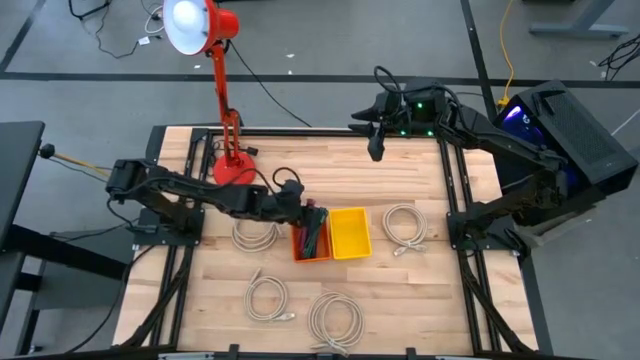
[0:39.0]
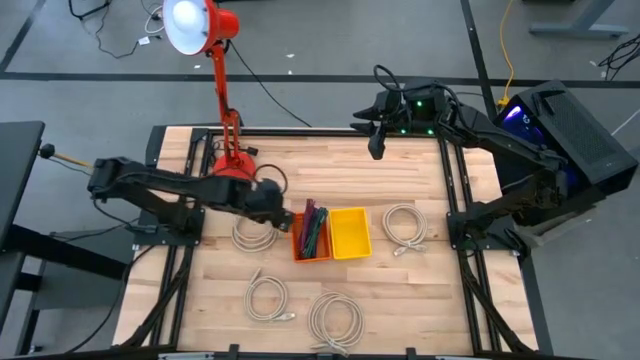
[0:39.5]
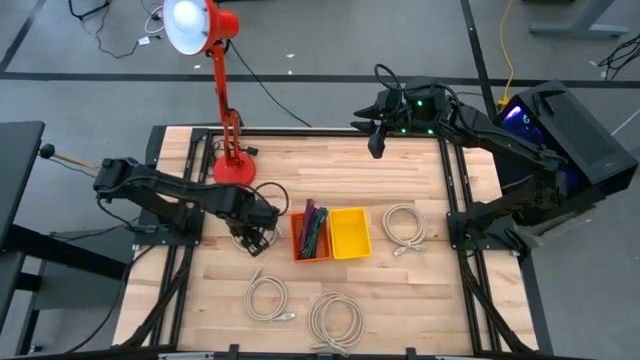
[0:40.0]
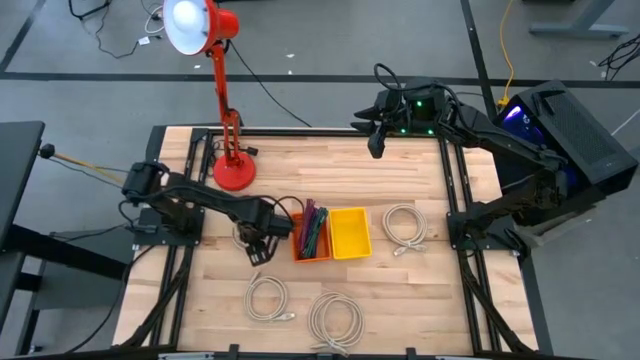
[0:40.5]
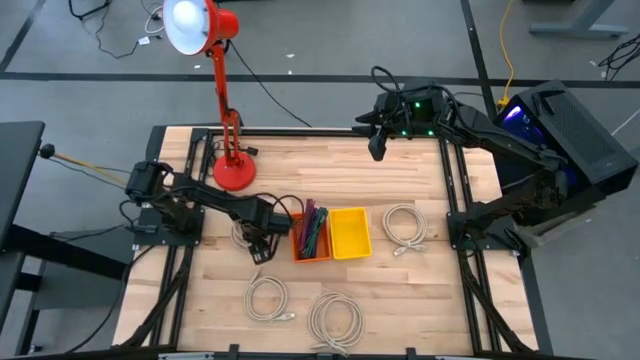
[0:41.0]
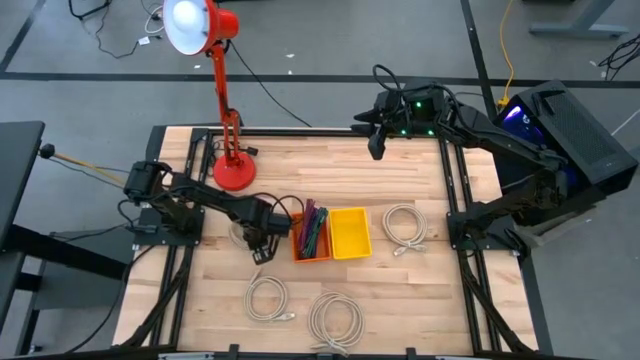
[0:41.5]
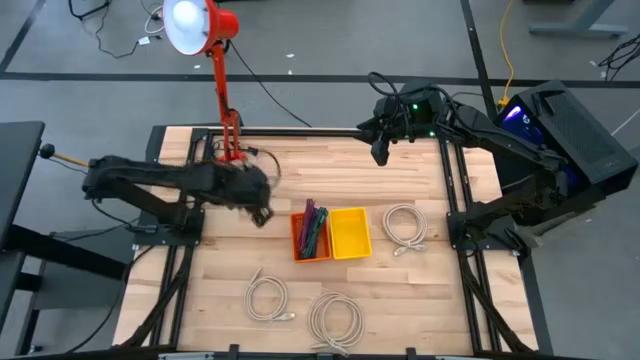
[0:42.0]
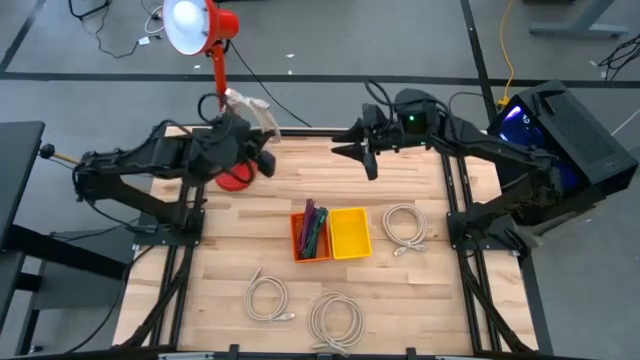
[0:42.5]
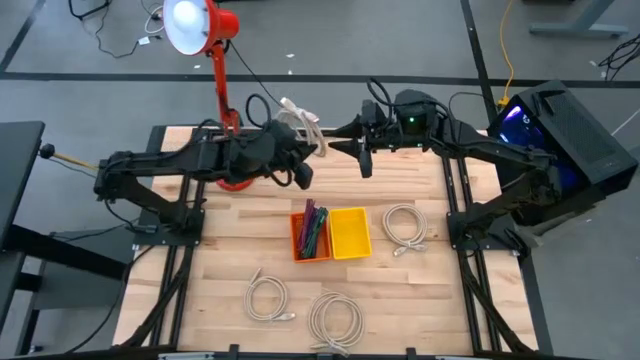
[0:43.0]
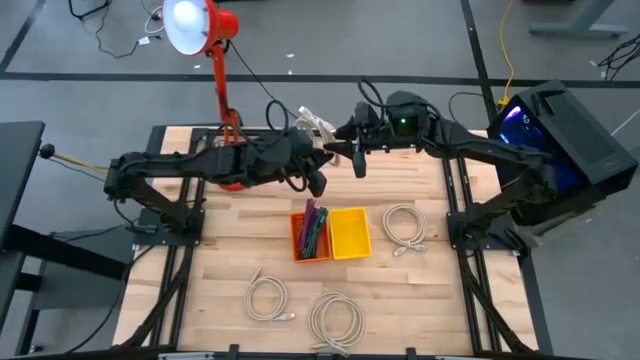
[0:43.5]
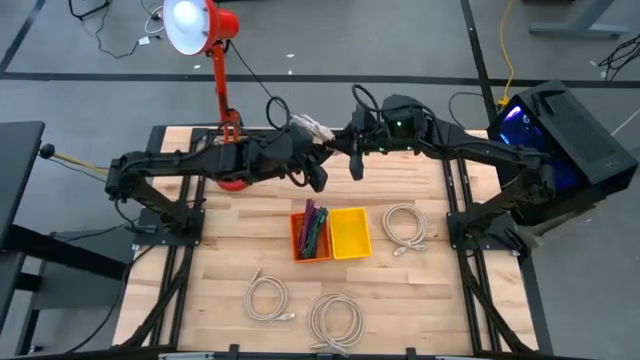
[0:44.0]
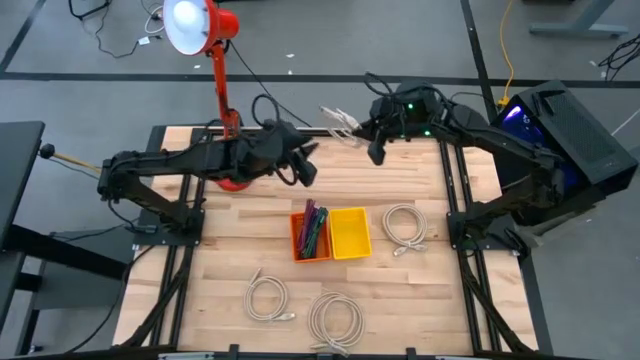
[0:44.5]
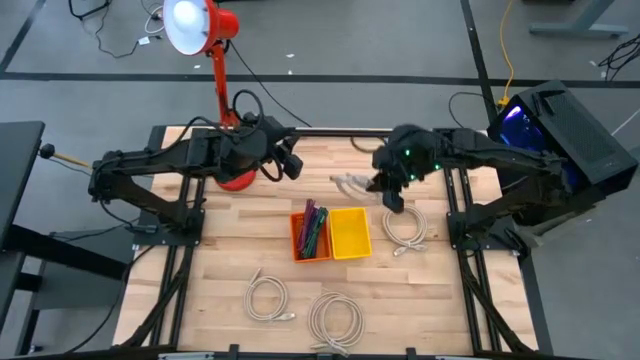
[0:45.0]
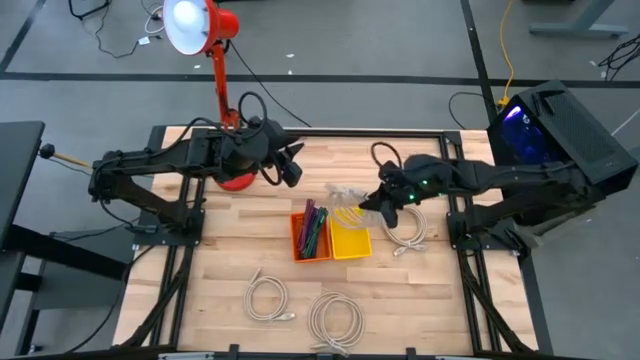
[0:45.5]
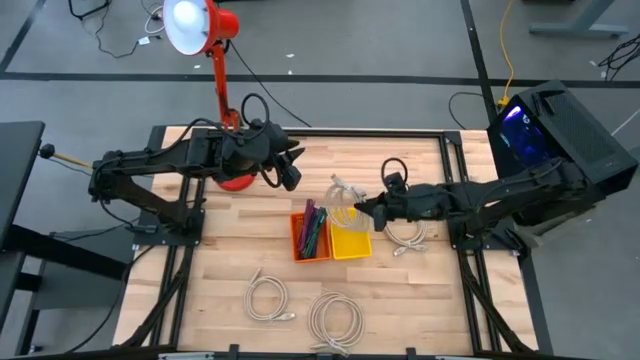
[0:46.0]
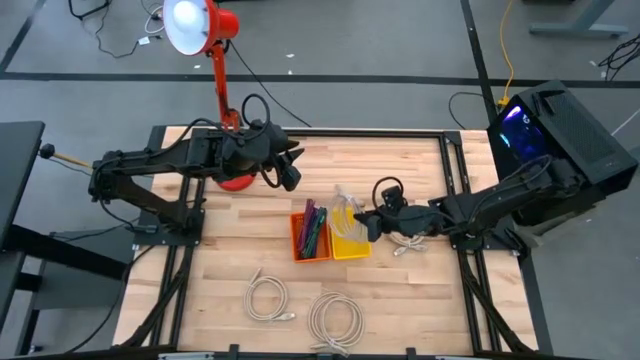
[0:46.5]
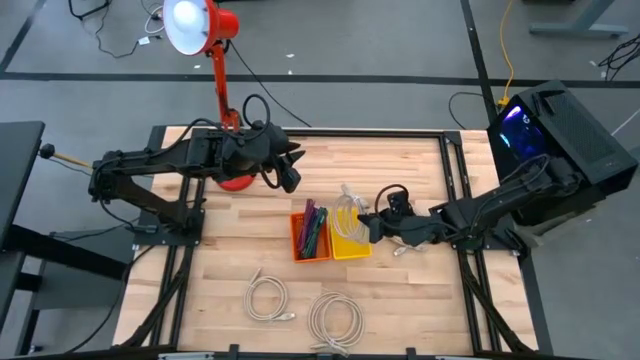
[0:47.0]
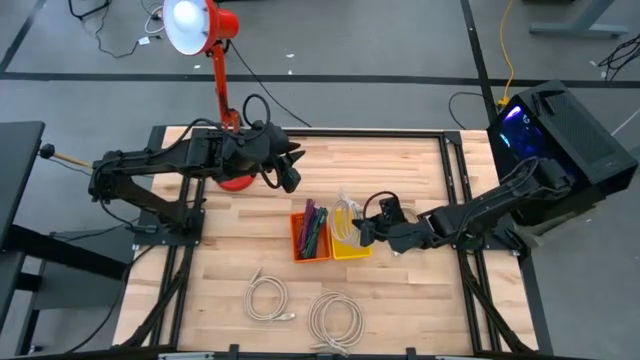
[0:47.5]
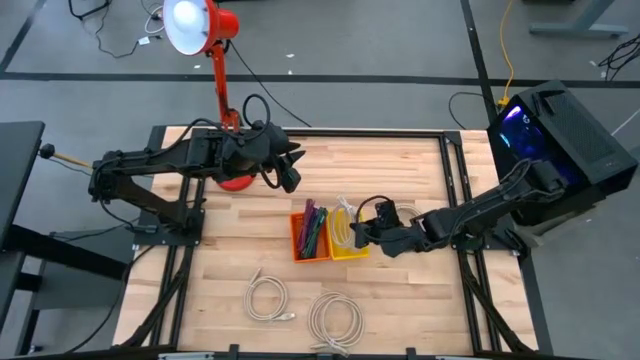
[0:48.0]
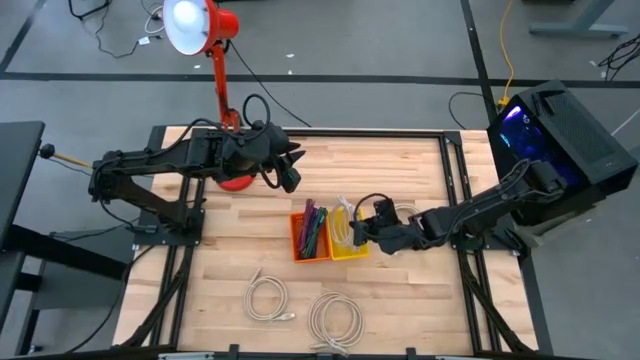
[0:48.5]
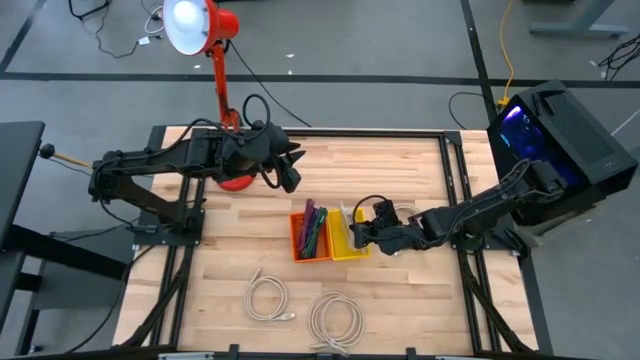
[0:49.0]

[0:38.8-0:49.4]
Task: Pick & Place USB Port
Put the light brown HDMI cable into the yellow bin

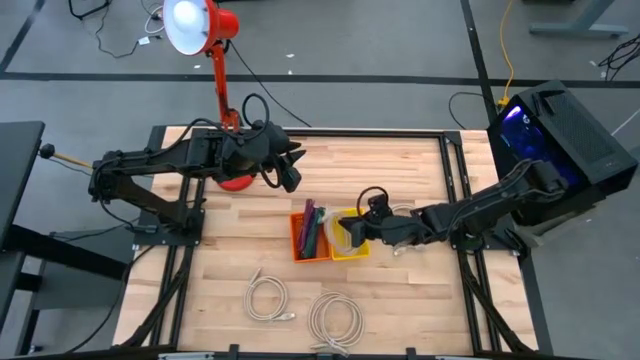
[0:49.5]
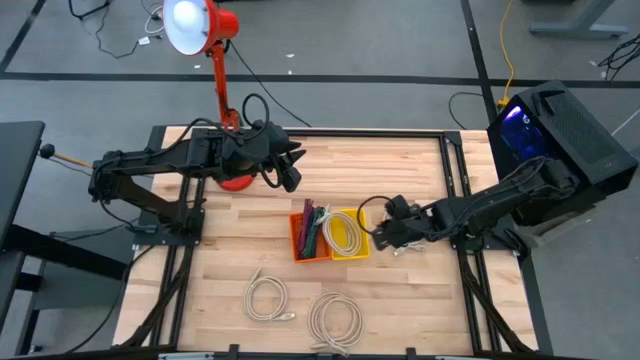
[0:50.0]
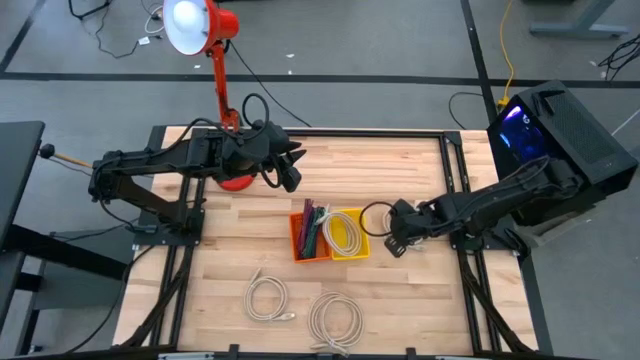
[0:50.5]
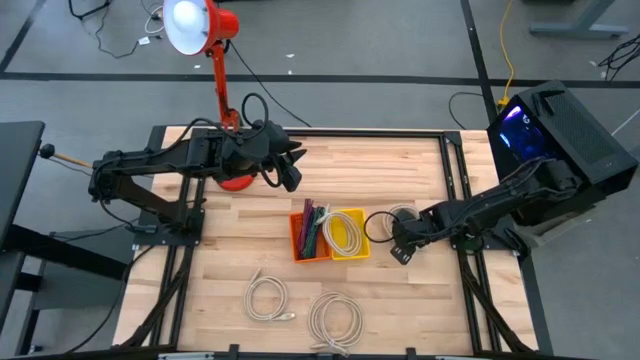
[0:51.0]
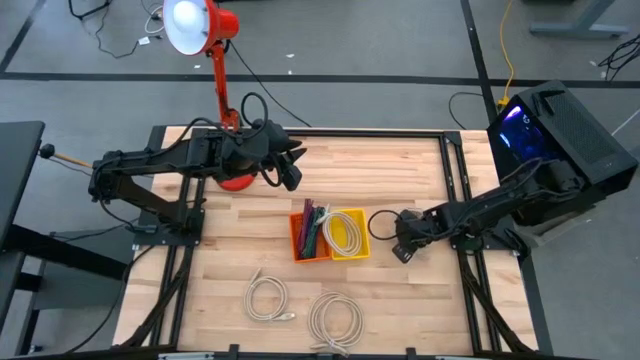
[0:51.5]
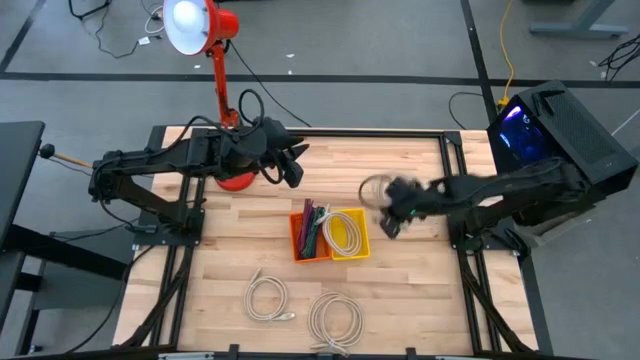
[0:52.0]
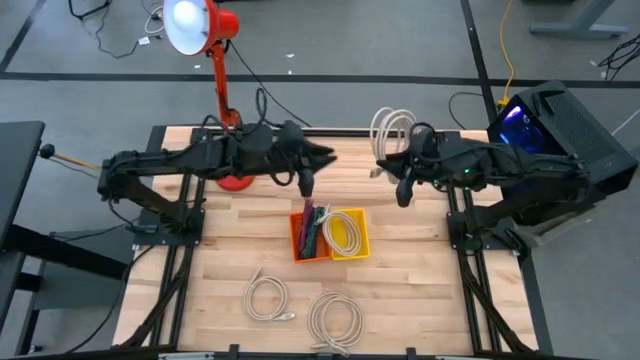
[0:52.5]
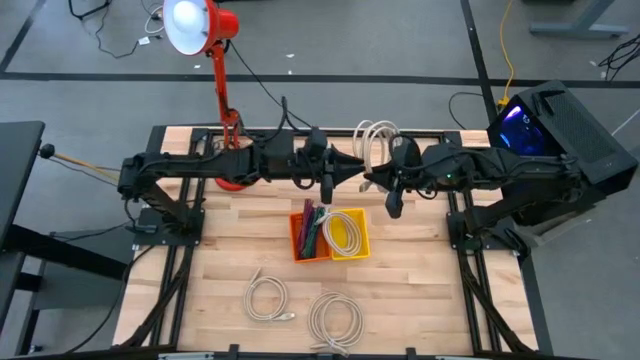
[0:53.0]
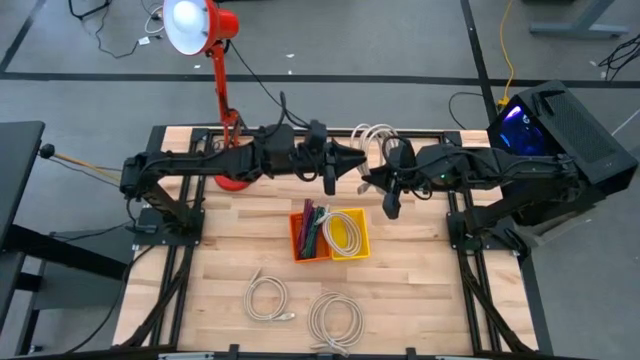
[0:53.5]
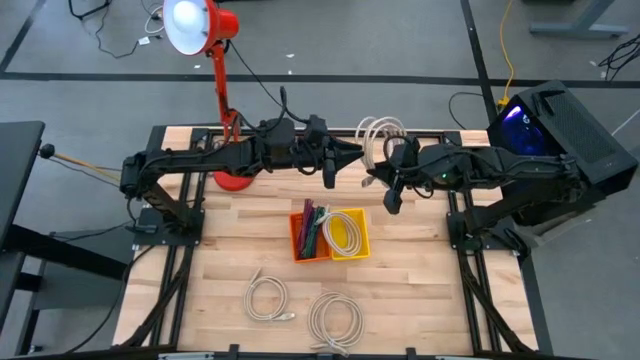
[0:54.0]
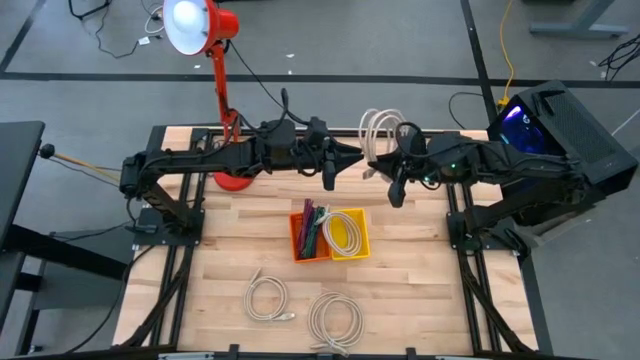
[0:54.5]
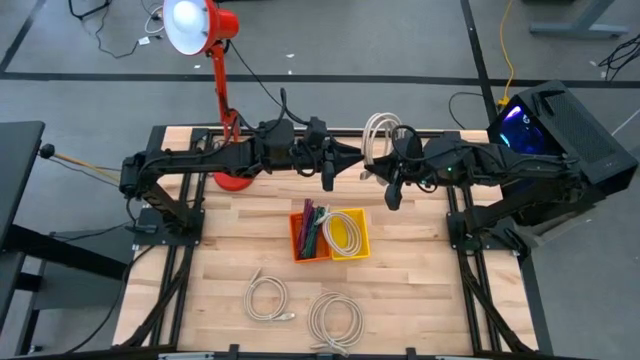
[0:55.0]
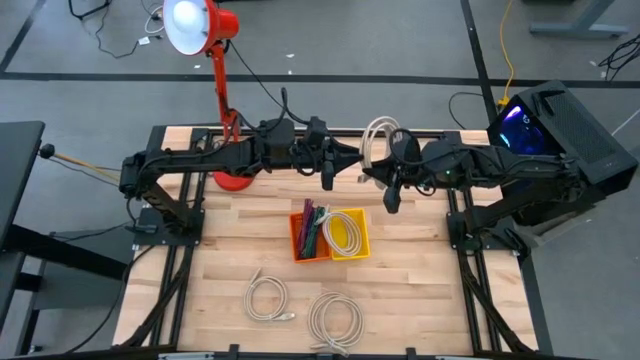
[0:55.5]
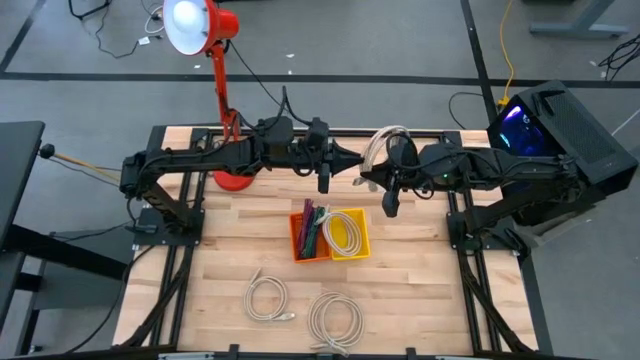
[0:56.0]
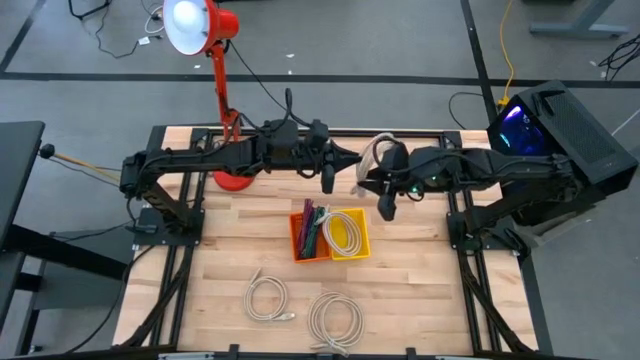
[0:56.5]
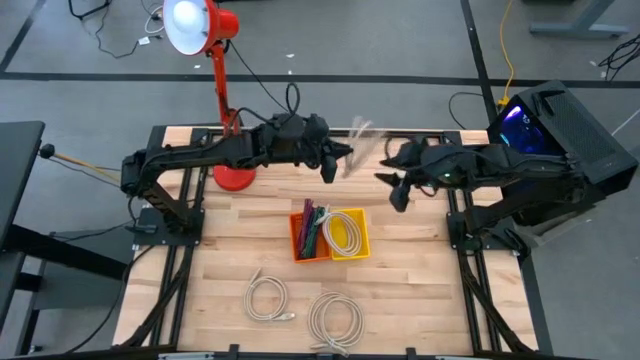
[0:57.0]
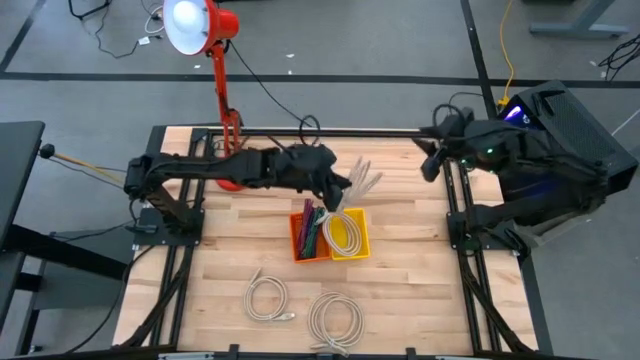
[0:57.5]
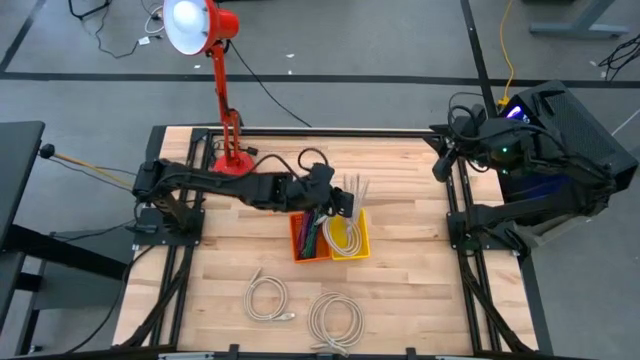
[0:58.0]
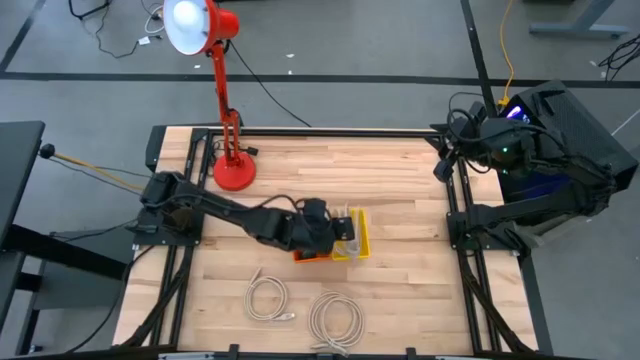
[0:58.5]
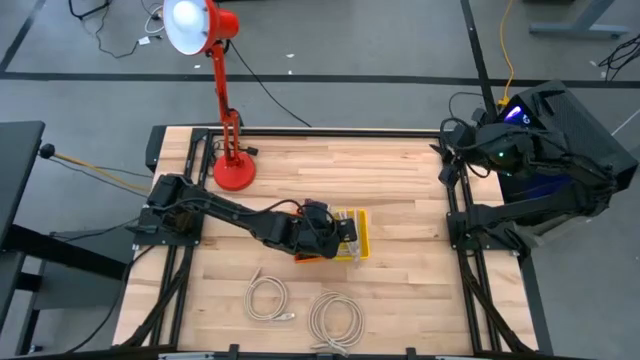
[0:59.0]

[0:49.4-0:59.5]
Put the light brown HDMI cable into the yellow bin

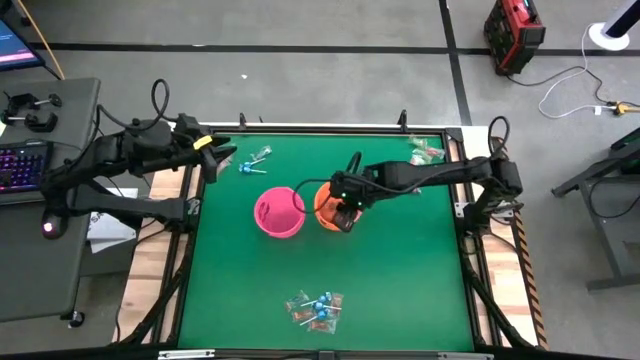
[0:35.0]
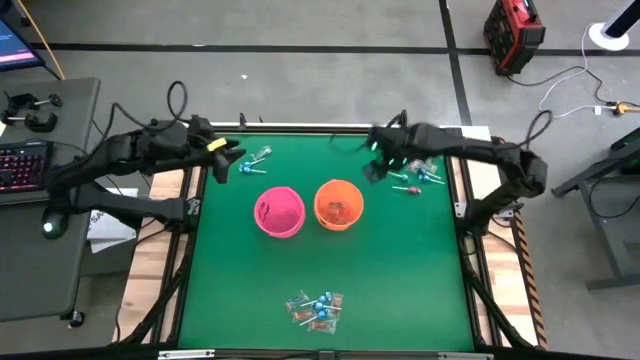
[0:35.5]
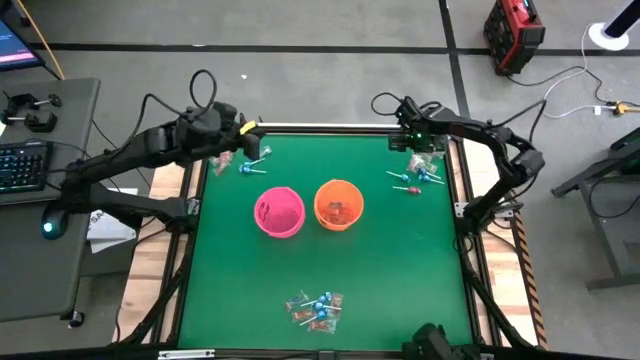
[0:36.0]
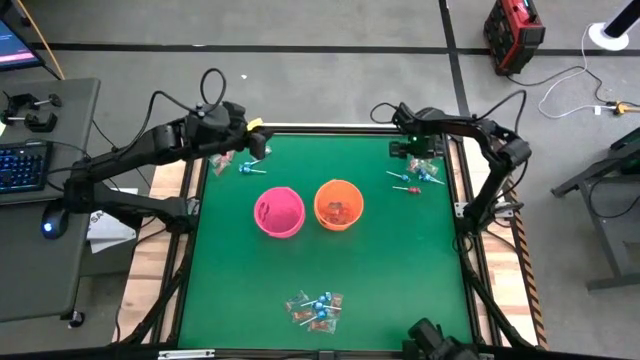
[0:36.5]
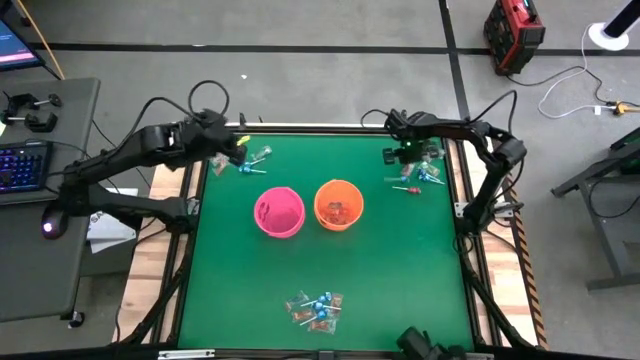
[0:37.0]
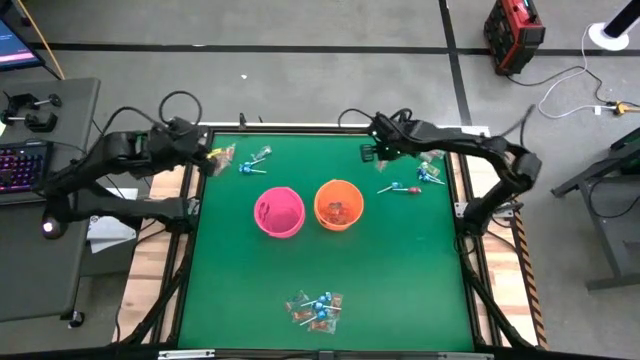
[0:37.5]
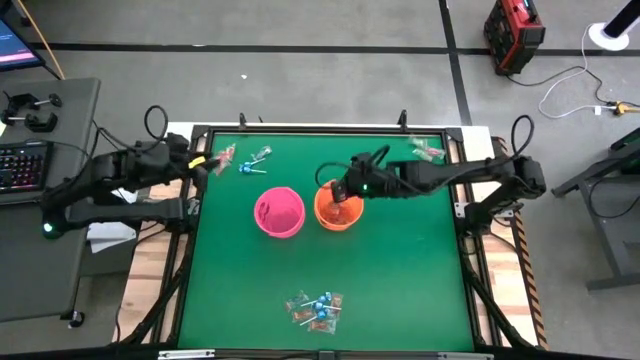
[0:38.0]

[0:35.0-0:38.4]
Task: Sort candy by brand, put in halloween buckets
Put the orange gummy into the orange bucket
